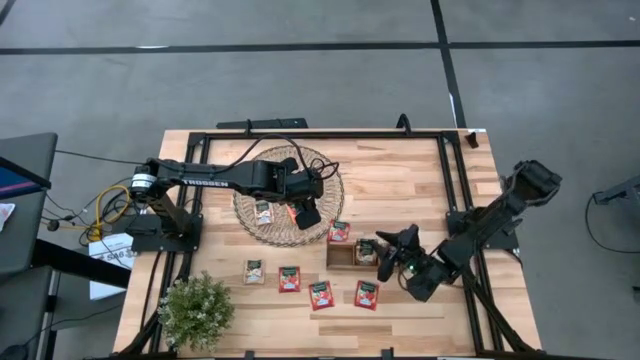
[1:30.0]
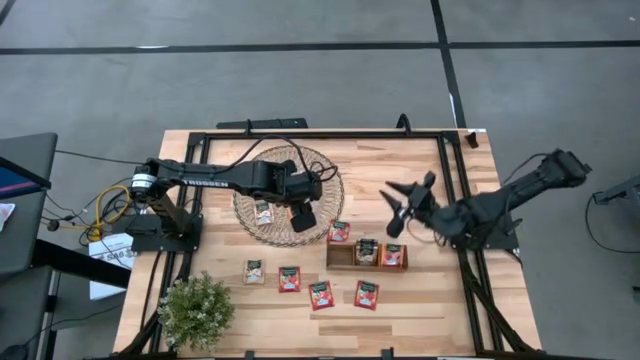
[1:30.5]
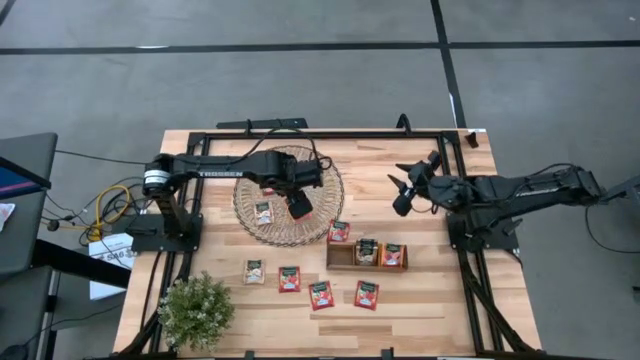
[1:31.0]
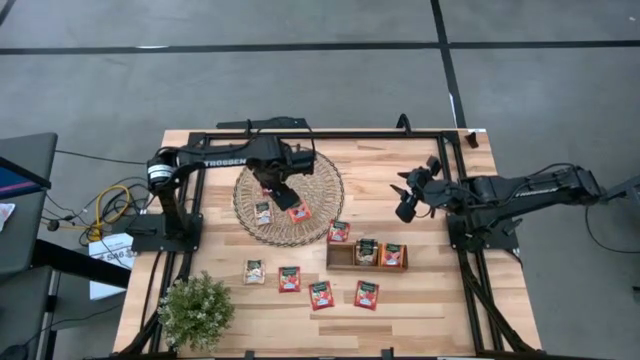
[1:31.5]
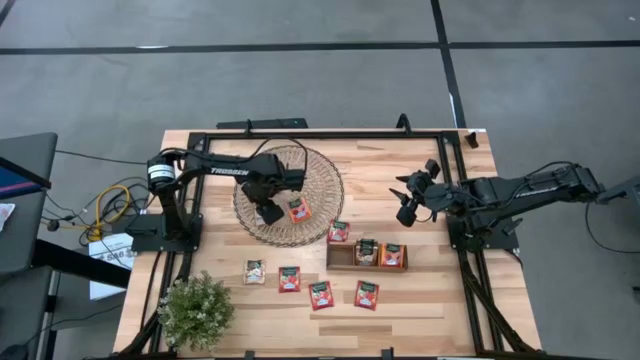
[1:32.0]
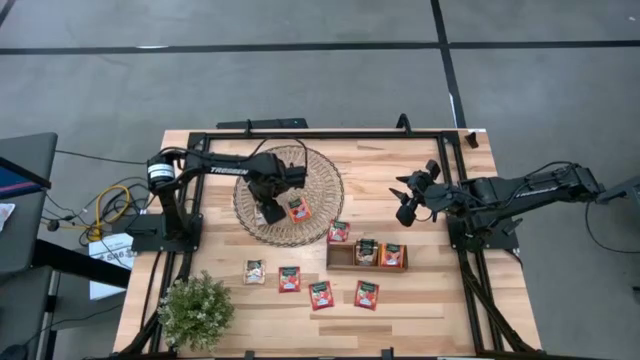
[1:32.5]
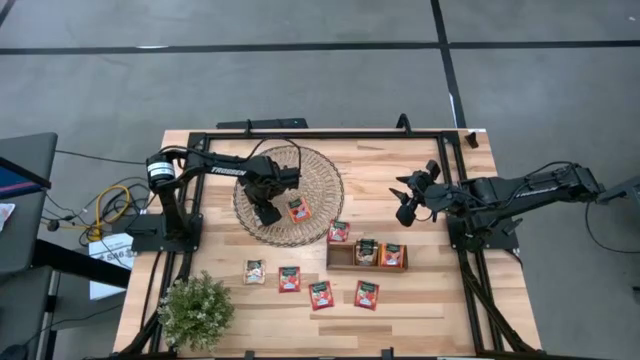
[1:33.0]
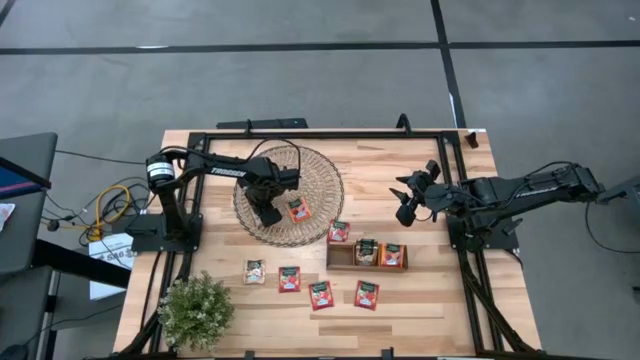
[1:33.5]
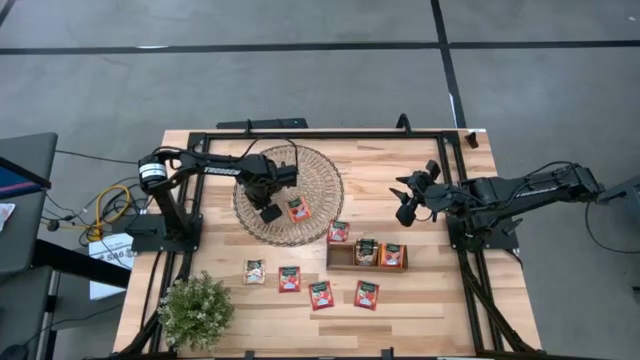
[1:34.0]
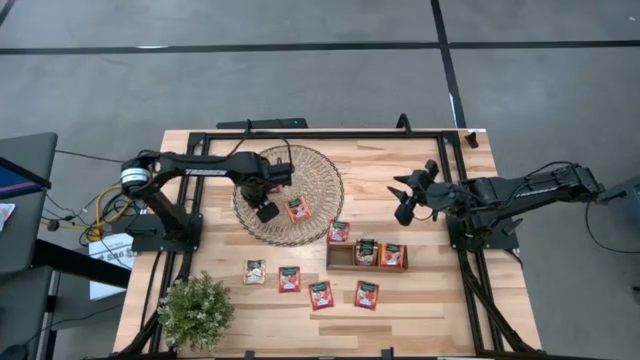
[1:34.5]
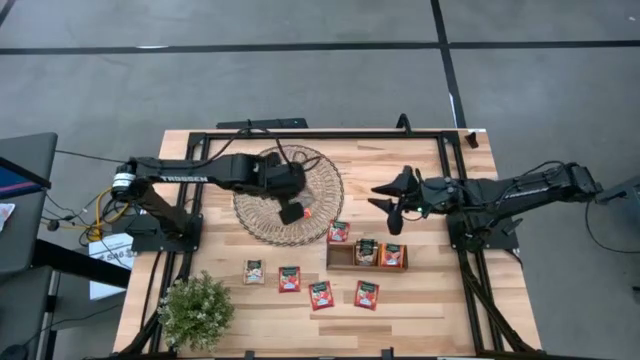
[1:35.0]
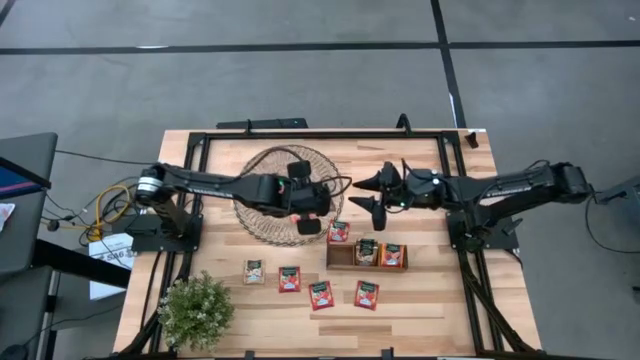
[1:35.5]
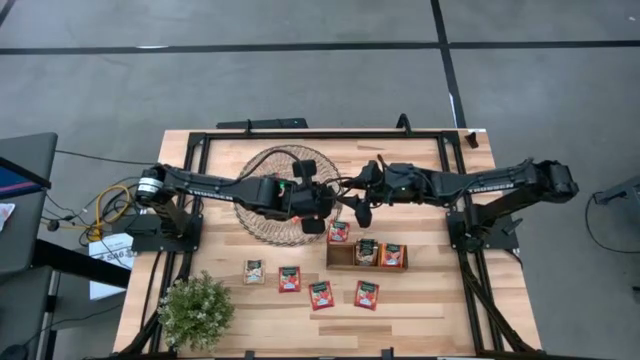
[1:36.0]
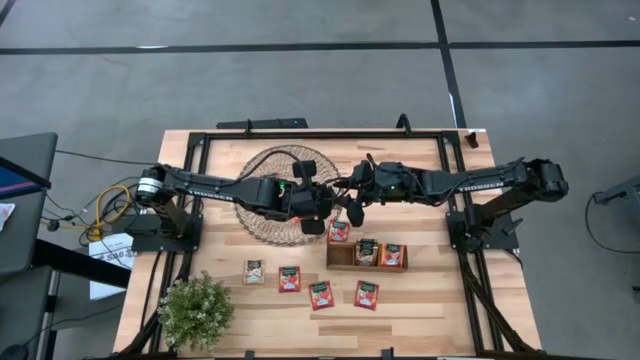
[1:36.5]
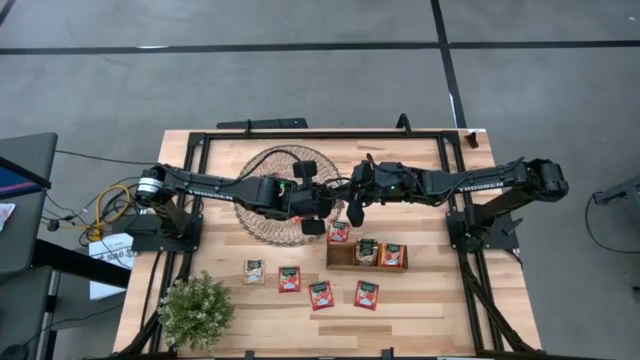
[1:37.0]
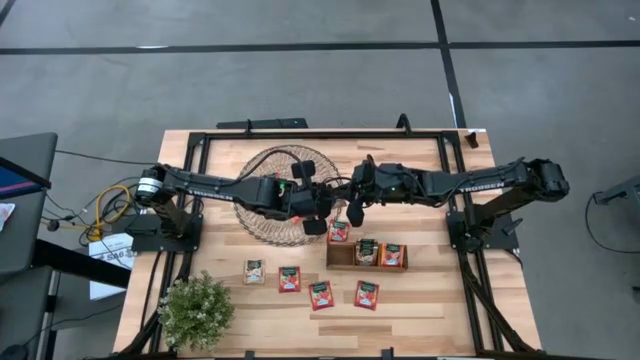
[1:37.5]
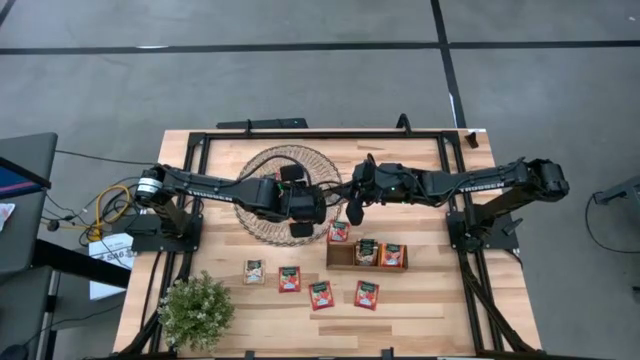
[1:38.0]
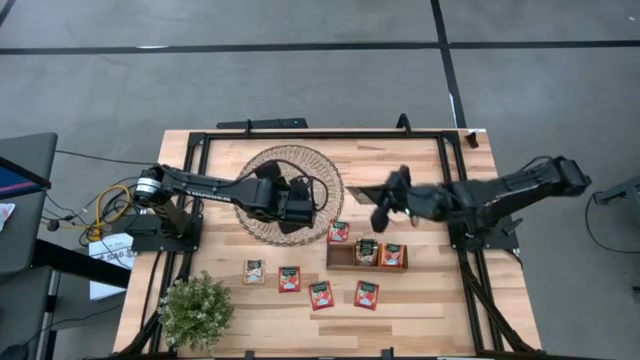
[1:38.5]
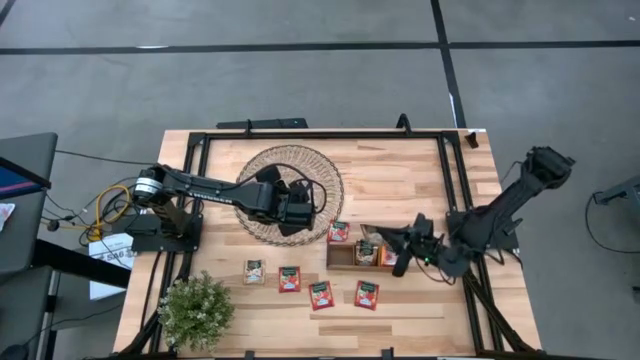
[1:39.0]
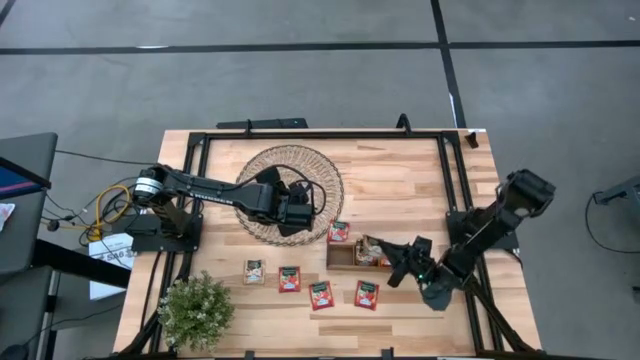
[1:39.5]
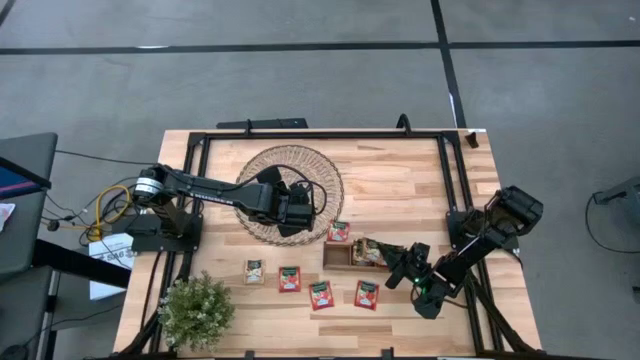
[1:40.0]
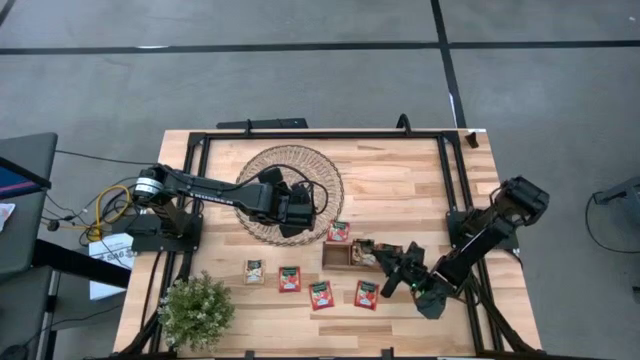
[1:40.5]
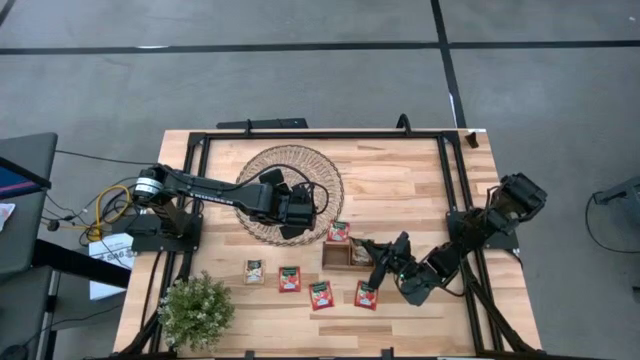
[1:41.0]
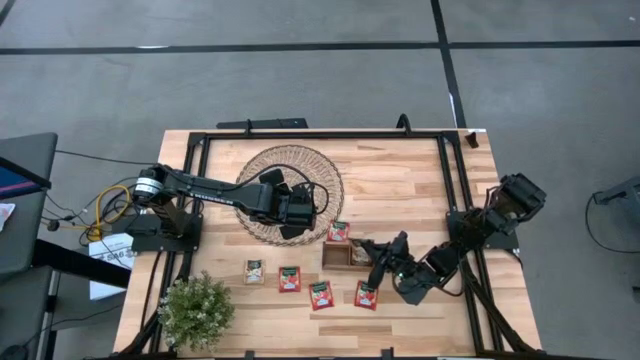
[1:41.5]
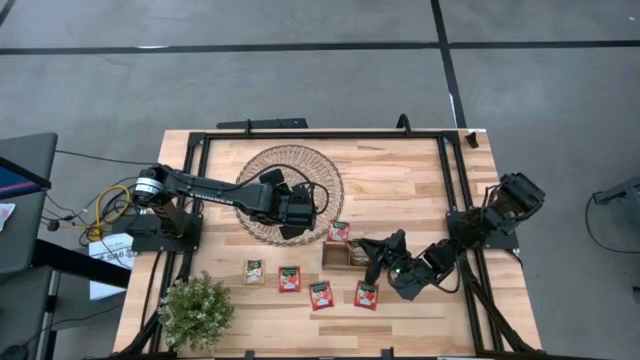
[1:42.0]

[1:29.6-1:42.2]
Task: Pick & Place Tea
Put the brown tea bag into the middle section of the brown bin
